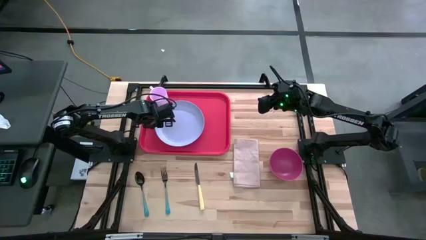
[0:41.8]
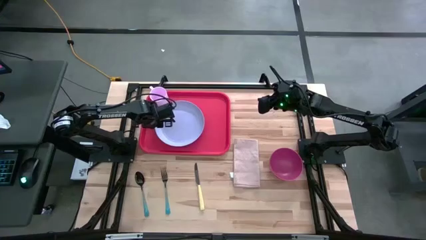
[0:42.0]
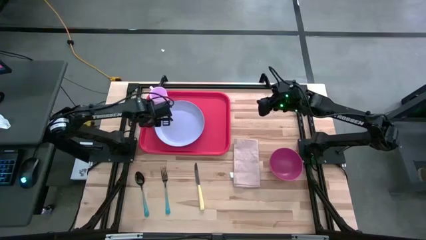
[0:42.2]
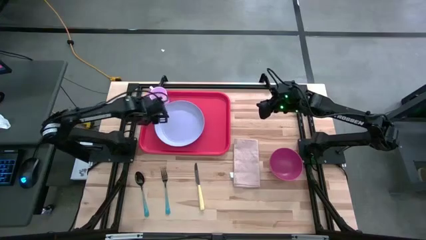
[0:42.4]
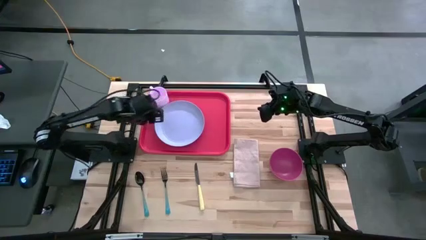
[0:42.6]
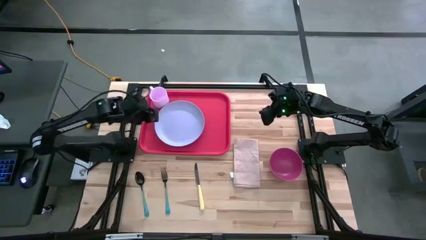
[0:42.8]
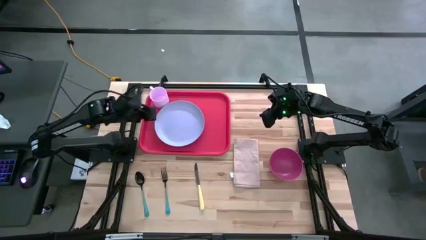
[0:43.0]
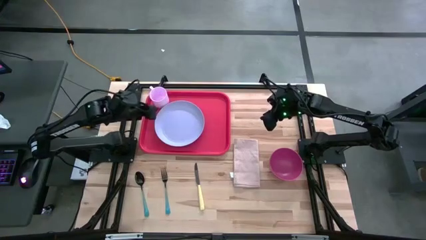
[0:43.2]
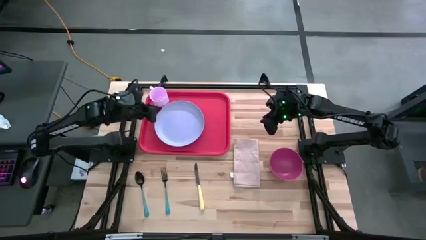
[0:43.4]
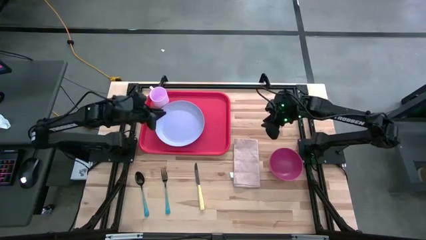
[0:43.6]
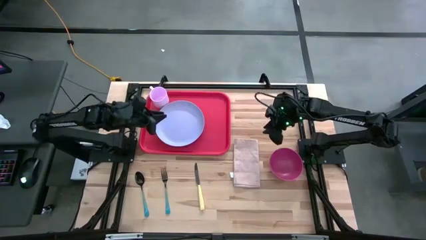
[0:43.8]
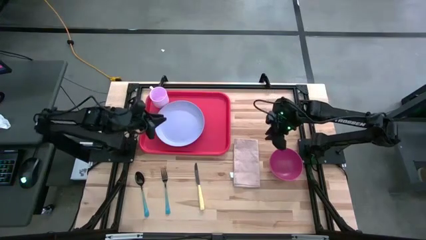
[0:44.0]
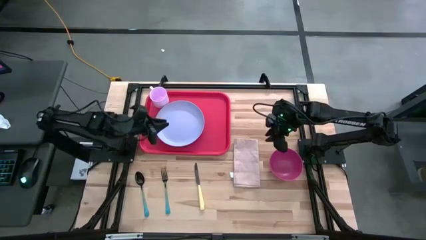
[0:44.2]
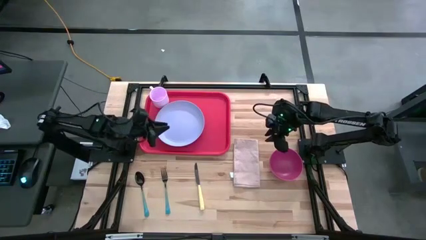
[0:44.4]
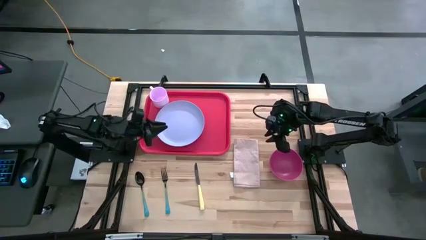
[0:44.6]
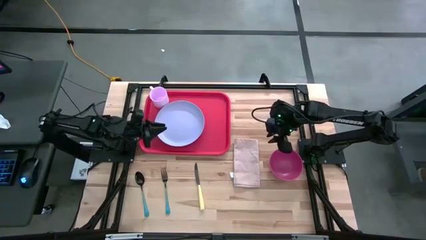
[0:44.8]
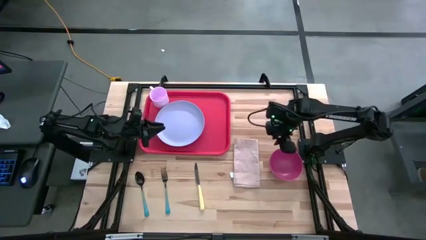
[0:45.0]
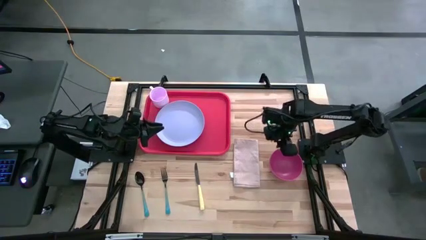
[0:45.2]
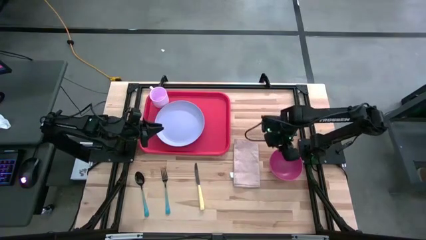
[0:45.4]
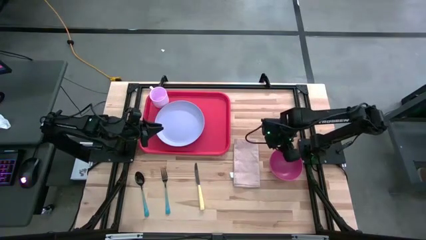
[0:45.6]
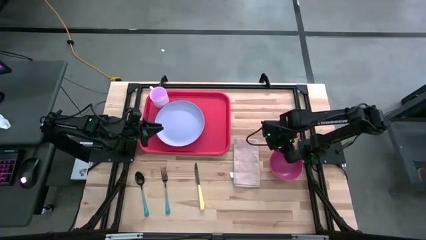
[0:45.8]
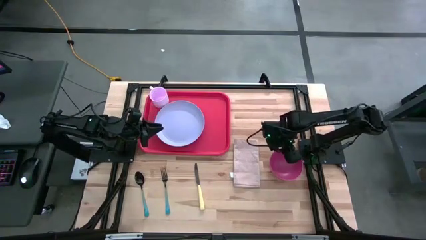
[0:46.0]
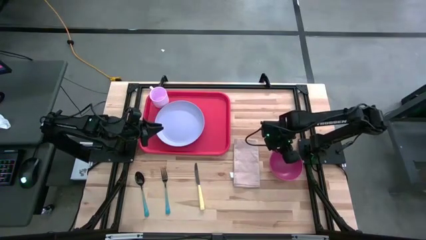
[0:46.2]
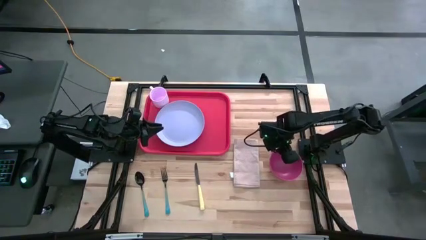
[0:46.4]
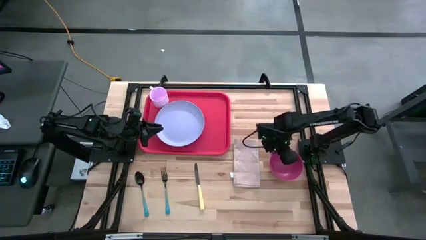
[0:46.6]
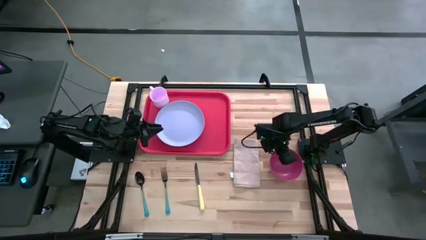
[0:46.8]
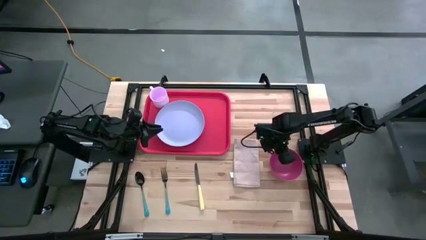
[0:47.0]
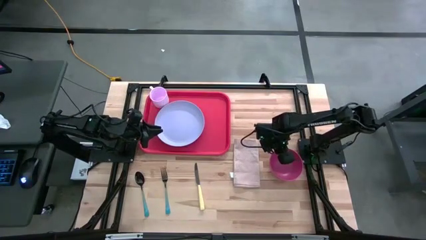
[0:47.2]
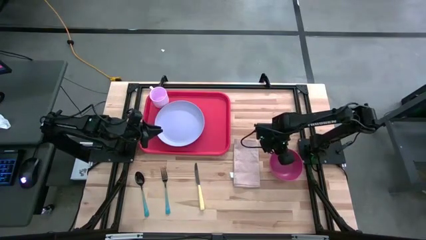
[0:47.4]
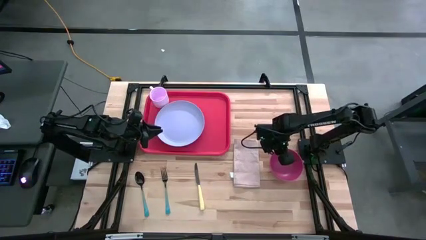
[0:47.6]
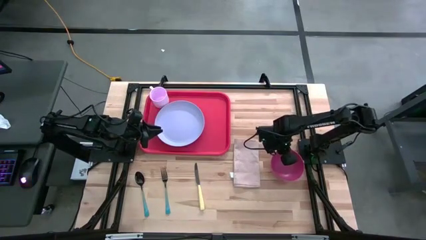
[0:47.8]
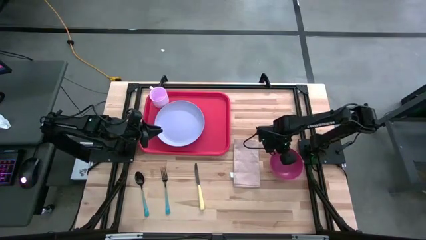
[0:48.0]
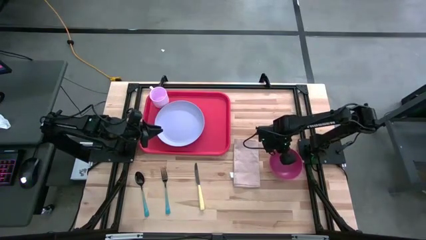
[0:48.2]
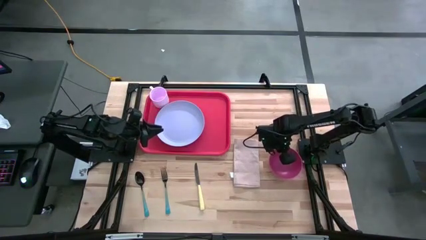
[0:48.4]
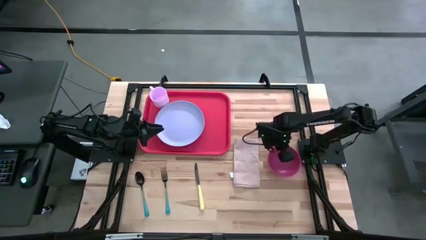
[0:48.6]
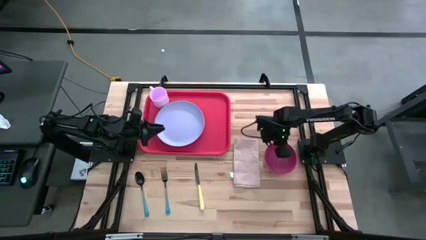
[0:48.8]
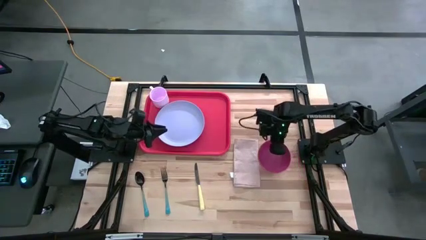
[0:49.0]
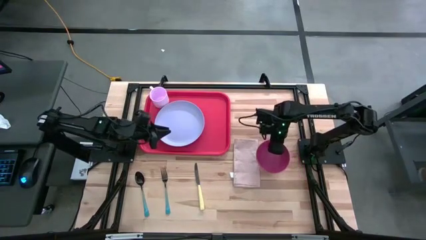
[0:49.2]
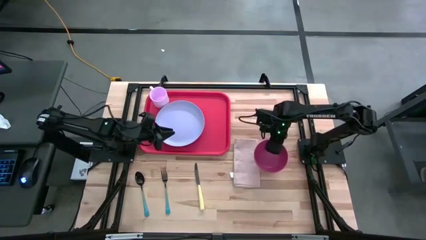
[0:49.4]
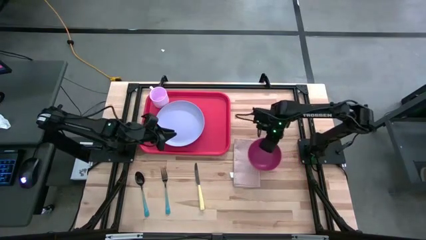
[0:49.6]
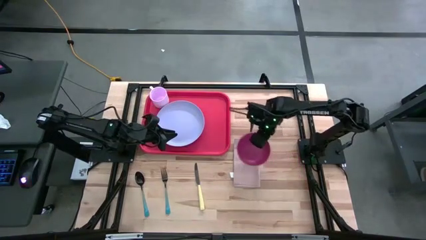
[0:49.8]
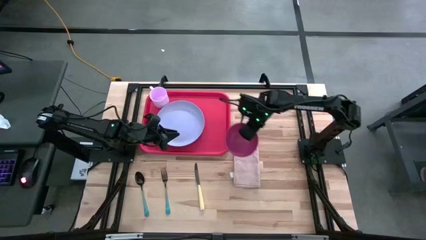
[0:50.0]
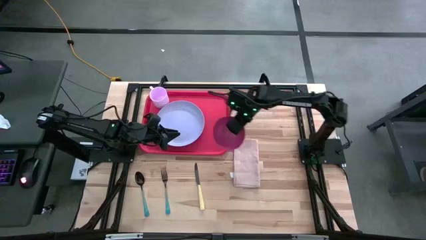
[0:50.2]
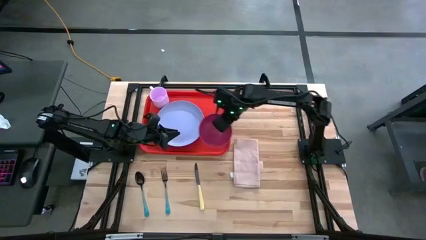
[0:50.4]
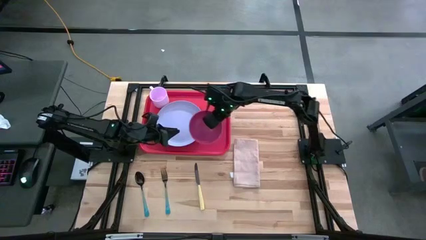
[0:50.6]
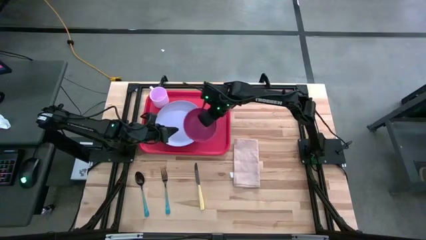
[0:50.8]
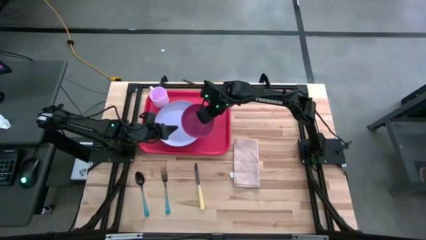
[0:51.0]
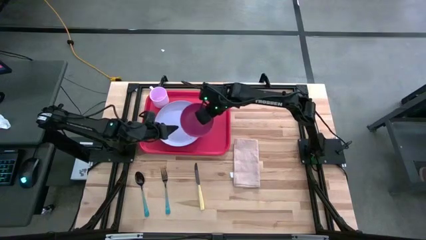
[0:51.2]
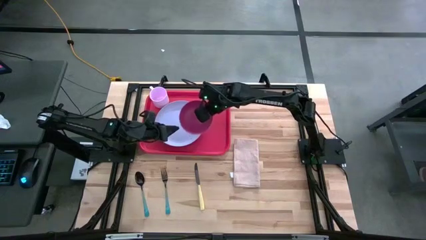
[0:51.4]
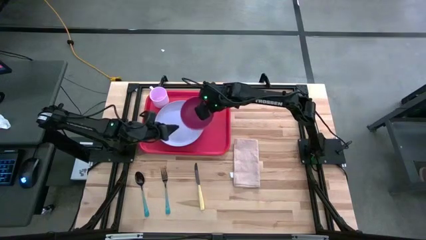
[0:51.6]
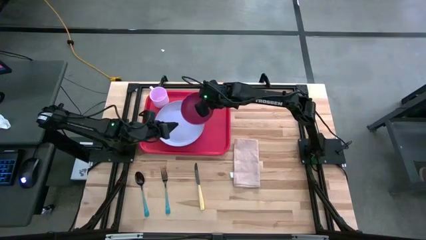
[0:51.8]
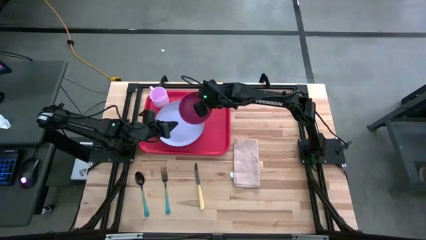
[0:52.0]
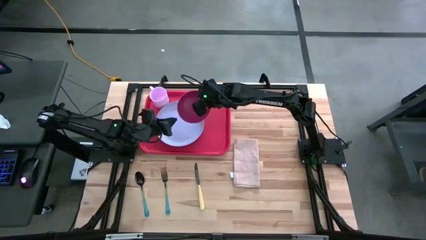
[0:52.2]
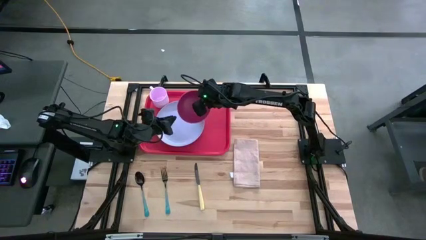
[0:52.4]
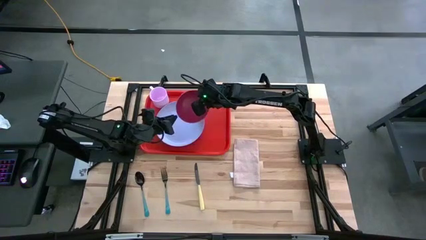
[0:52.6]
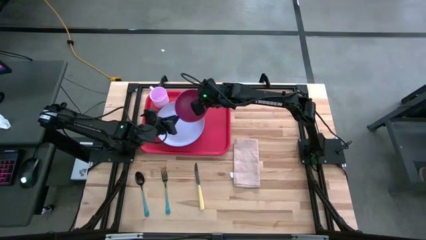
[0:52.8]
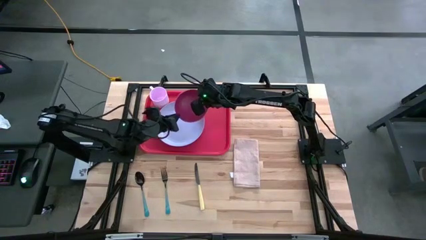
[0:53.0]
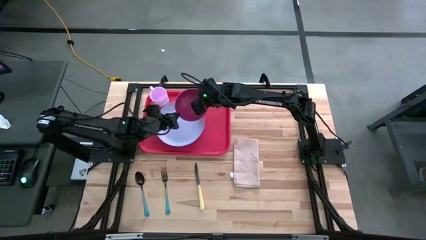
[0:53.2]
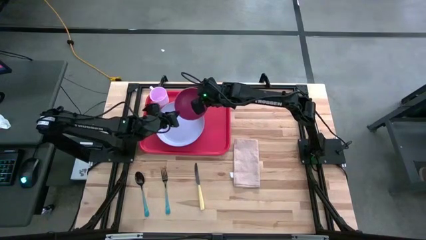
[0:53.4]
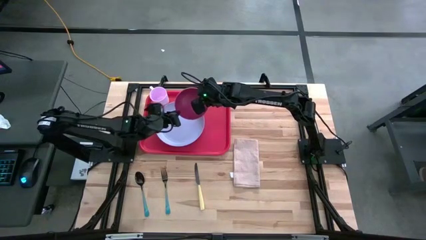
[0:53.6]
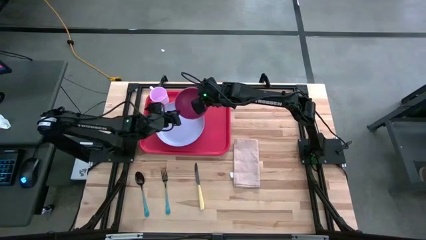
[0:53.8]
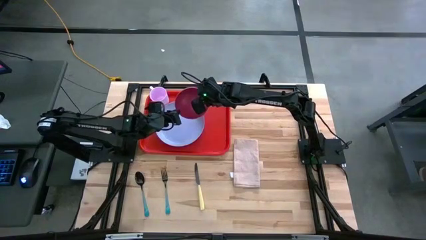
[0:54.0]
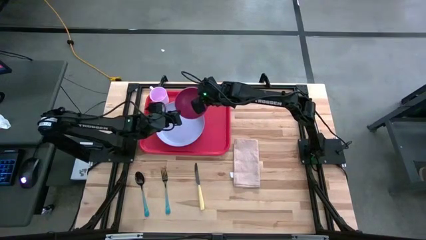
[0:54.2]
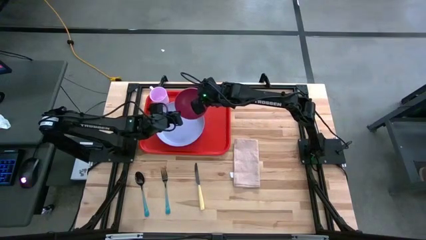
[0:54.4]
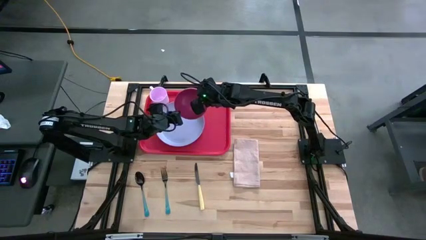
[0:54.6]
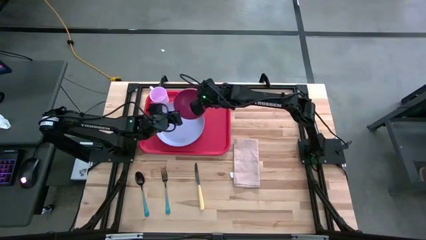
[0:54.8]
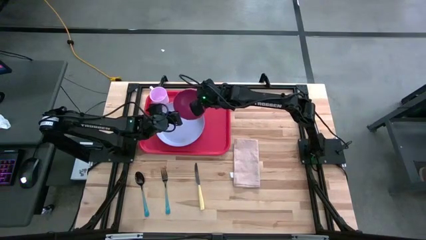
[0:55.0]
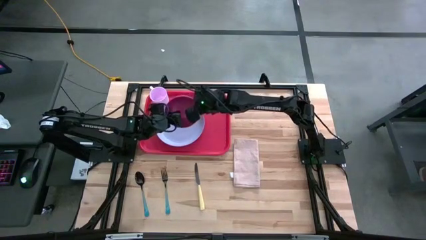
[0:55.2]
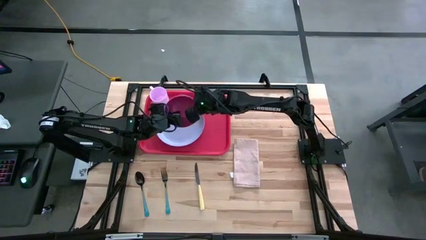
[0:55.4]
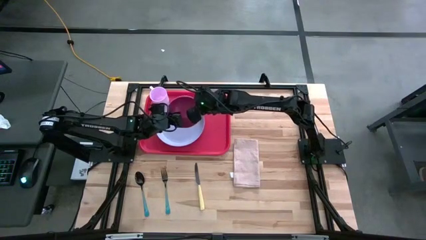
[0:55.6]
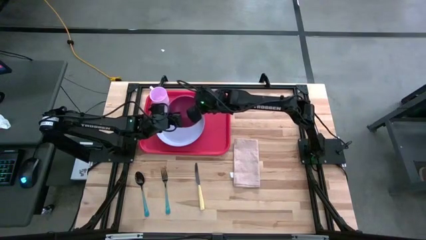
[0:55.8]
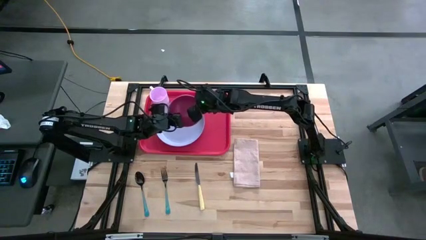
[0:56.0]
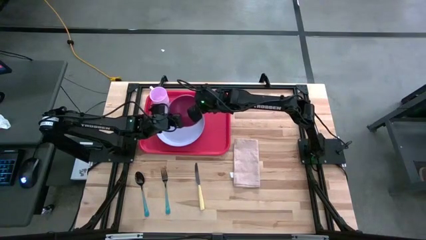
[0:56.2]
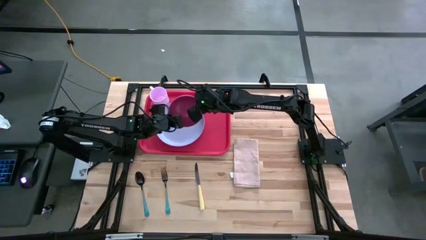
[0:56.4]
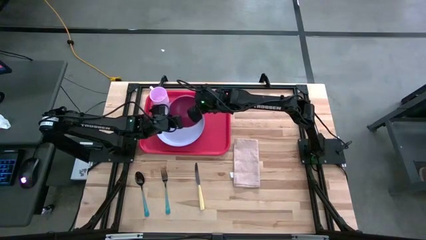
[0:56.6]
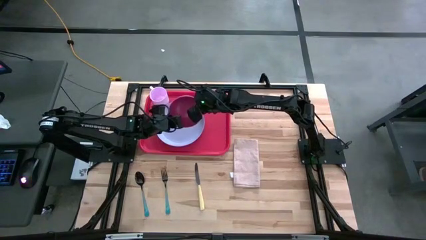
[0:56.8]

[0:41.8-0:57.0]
Task: Set up tray
Put the pink bowl on top of the violet plate on the red tray
